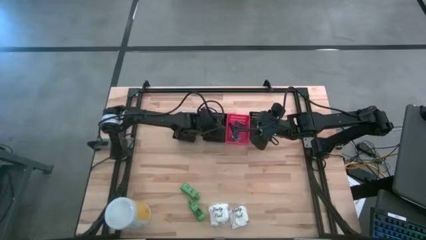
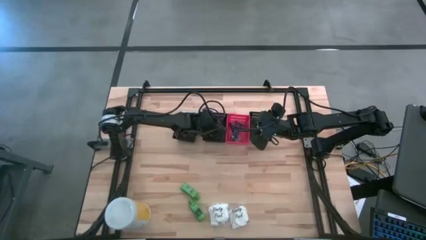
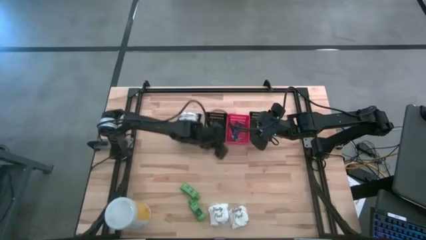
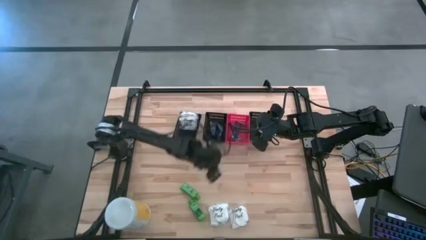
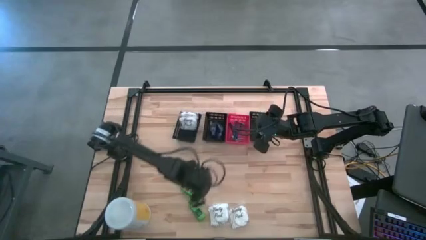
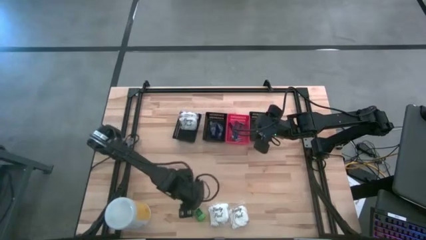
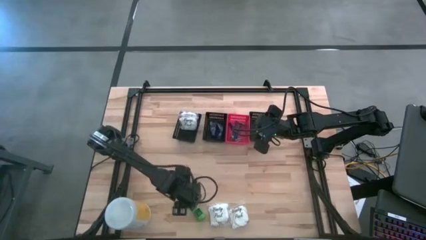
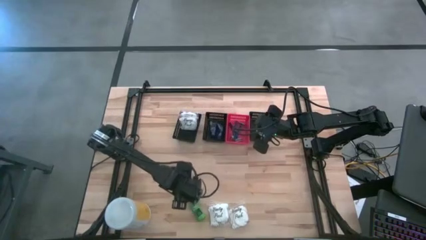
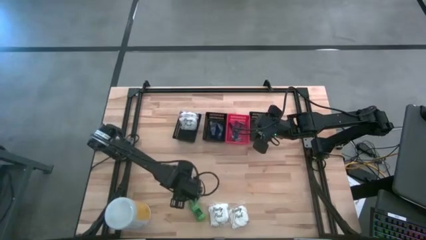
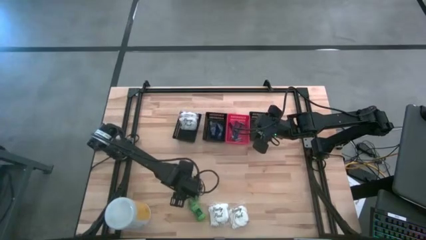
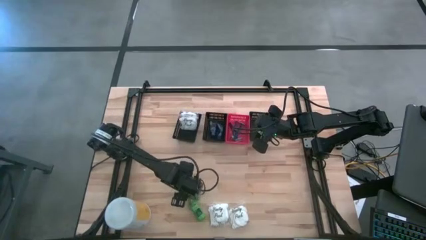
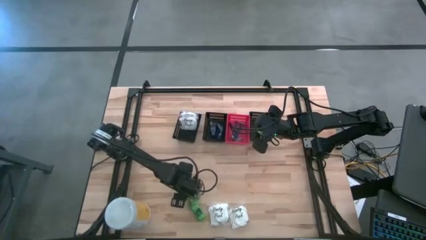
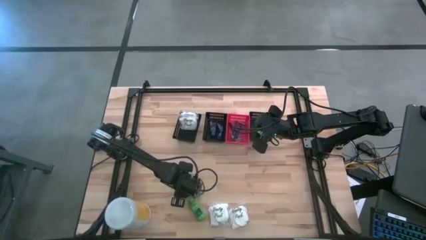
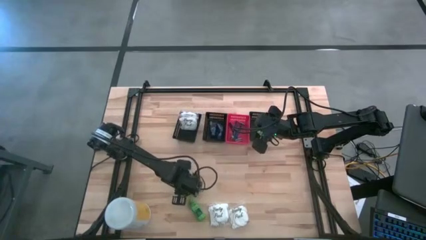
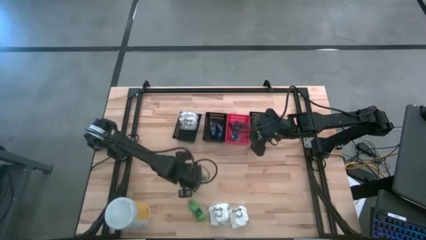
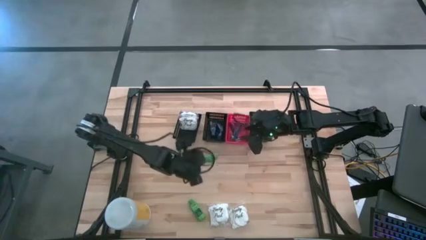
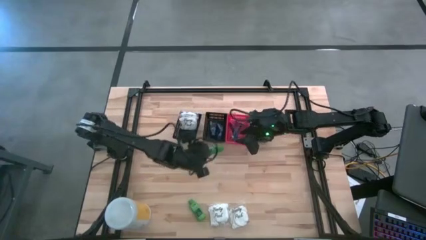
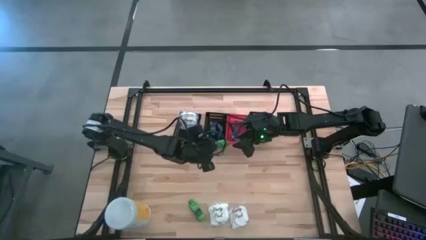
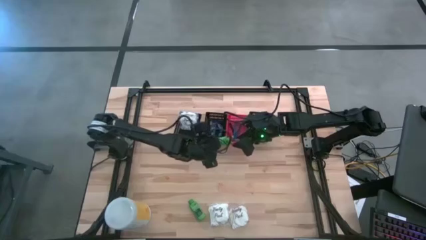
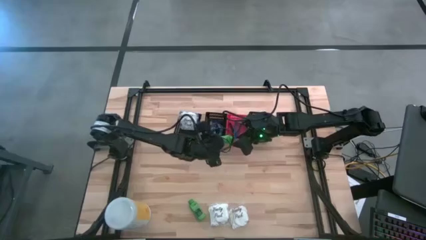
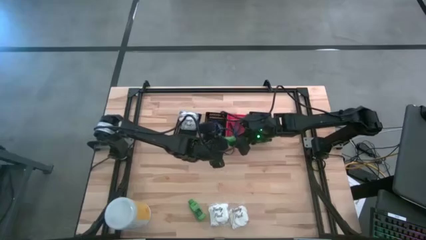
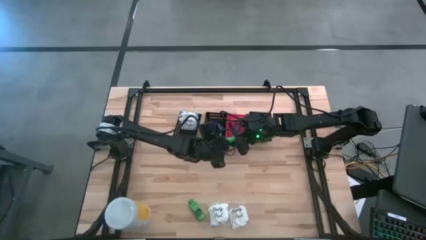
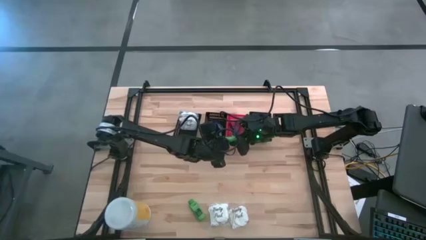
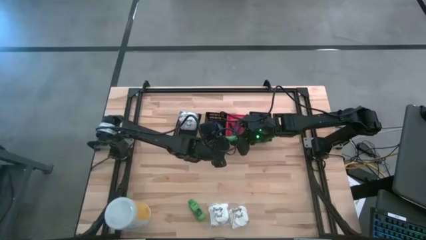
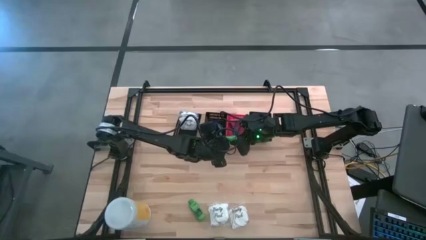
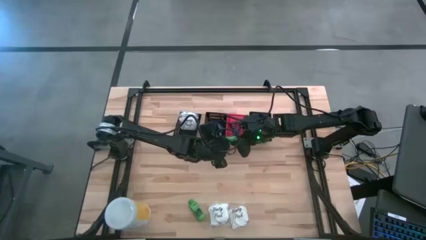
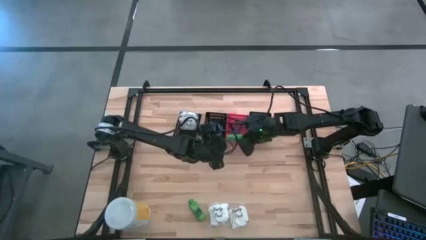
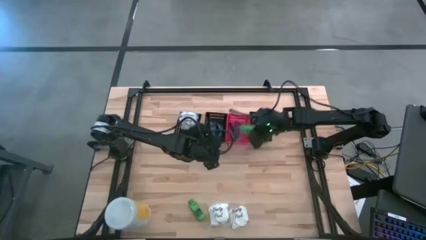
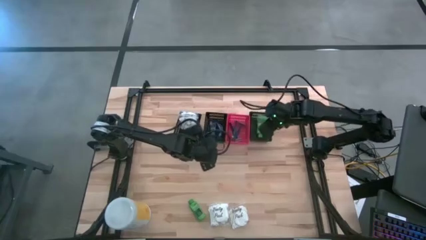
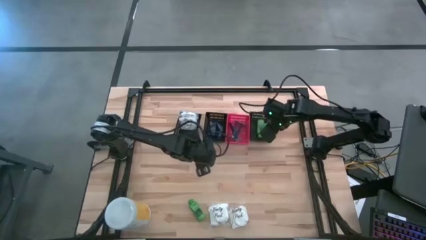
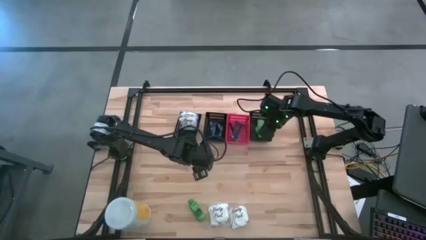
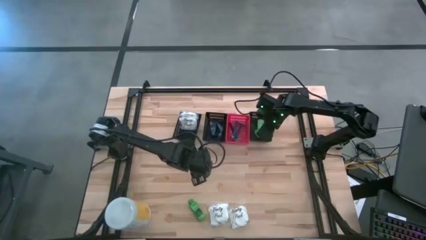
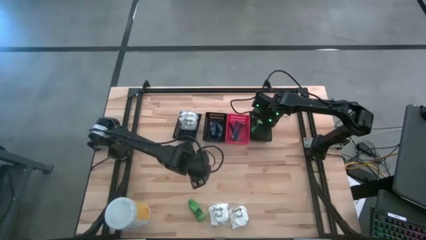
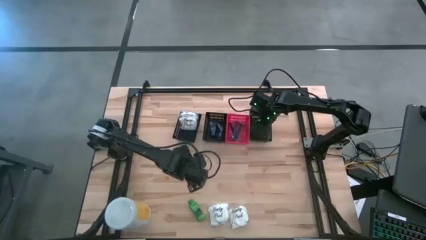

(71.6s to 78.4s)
Task: Pick & Place Travel size toiletries
Put the shampoo into the right black bin

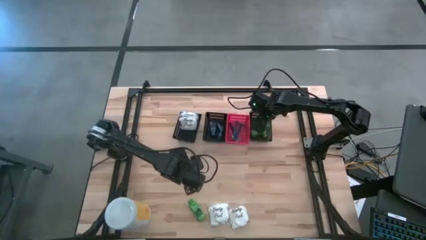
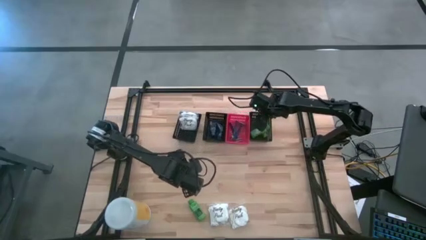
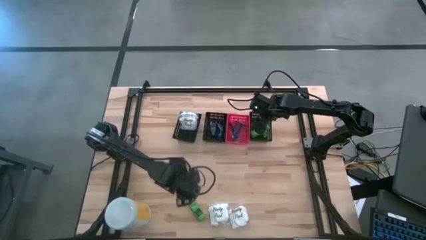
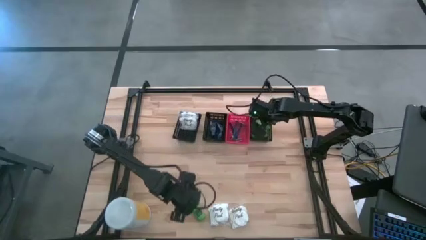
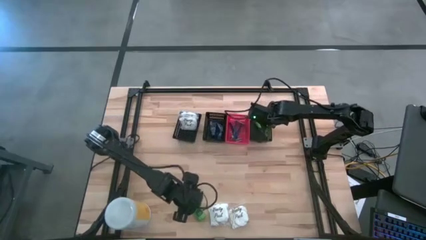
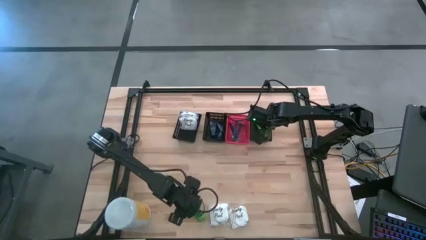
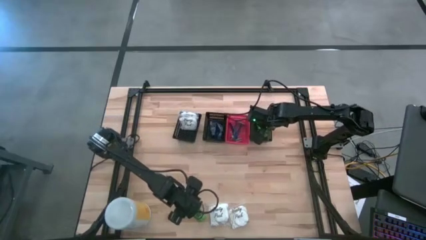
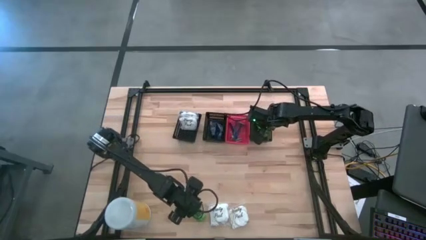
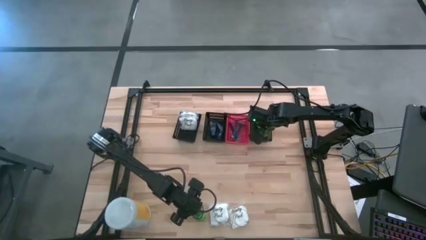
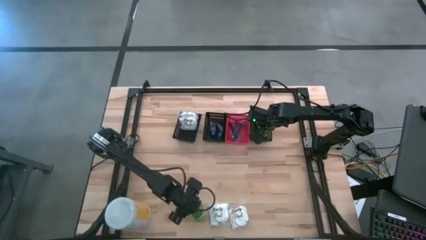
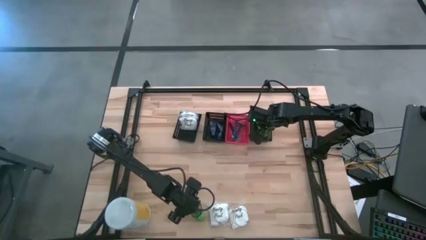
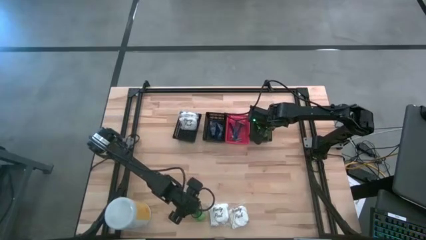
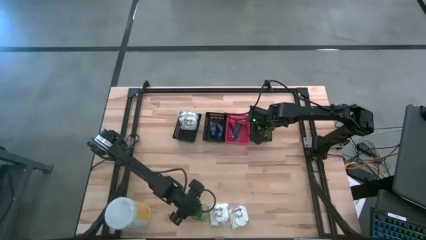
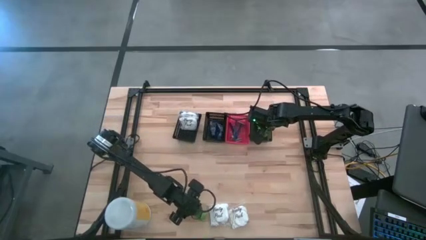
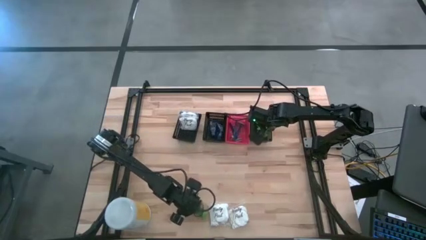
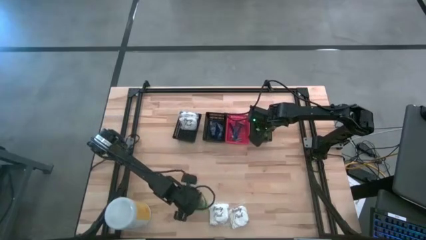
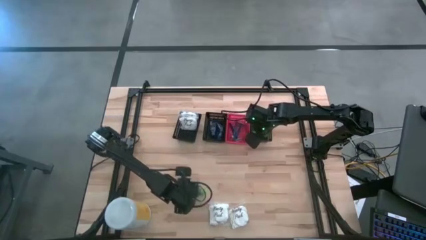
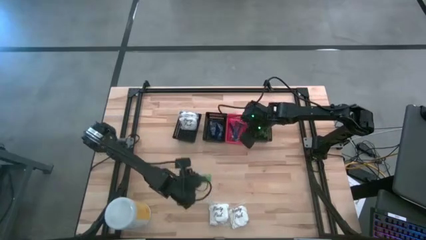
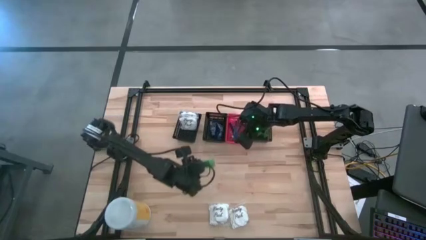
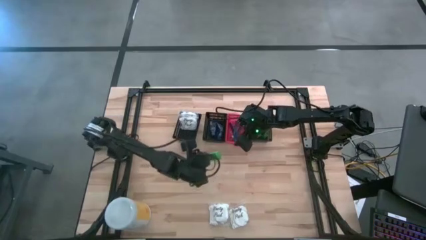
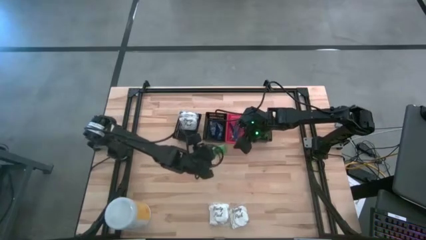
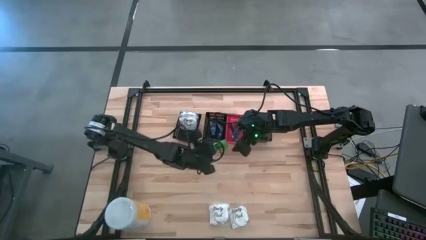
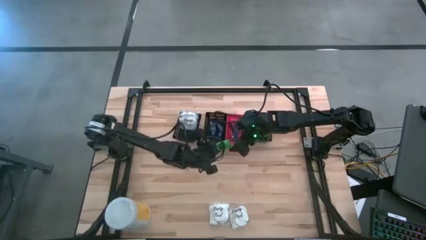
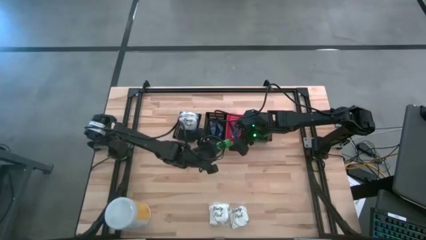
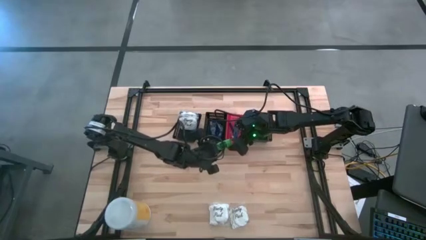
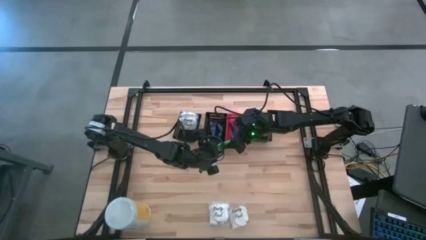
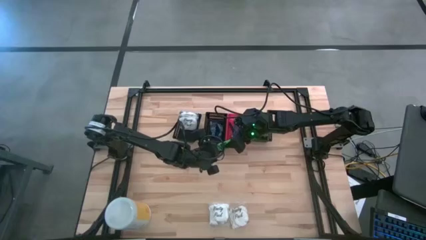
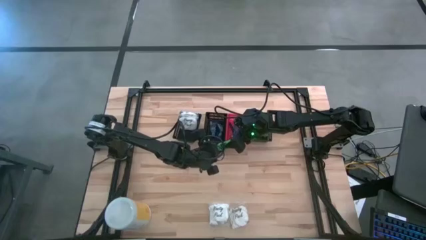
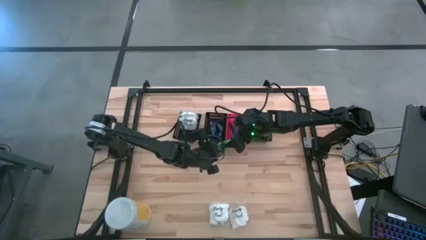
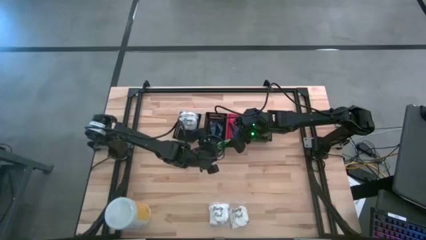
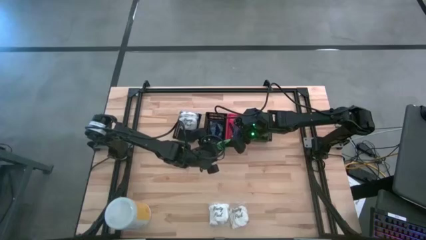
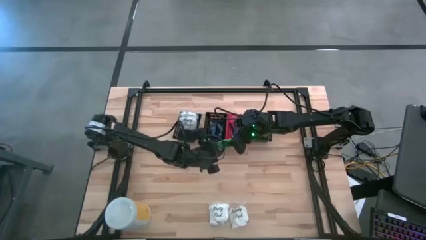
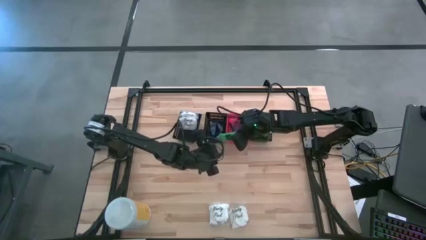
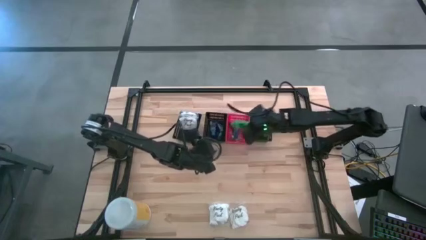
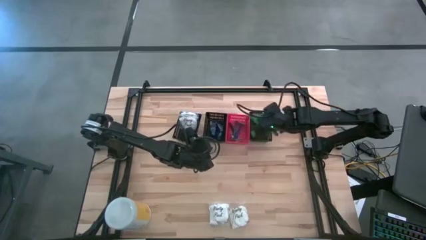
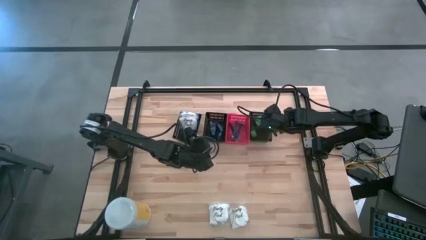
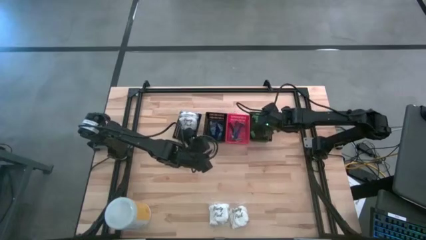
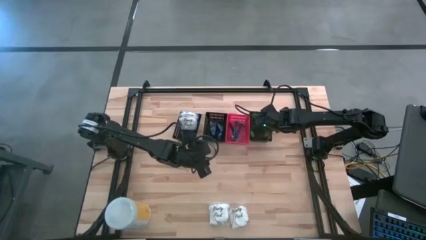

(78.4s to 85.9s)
Put the shampoo into the right black bin

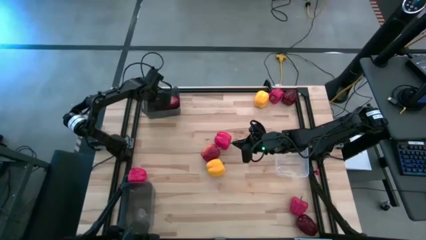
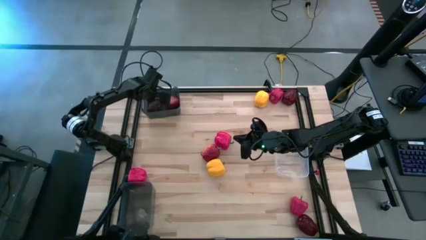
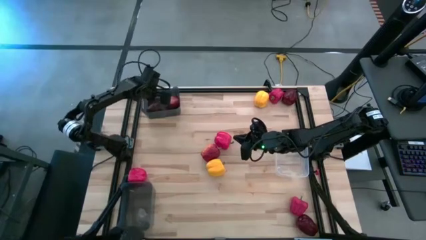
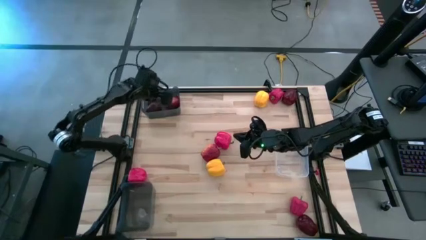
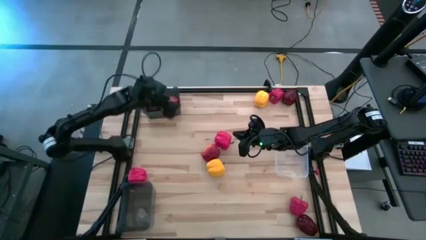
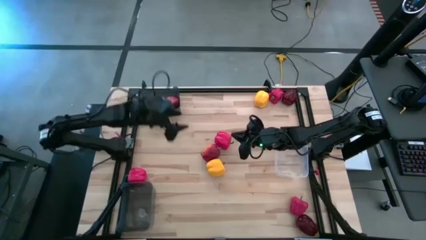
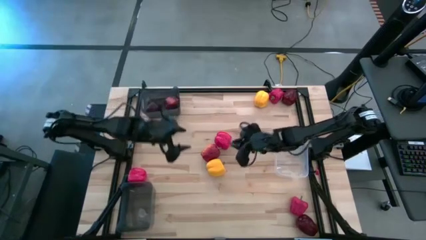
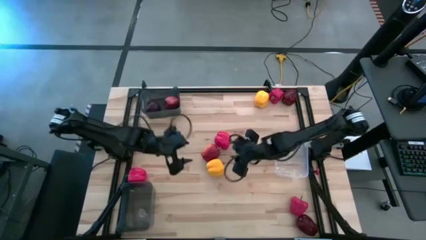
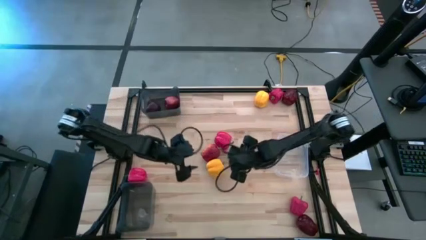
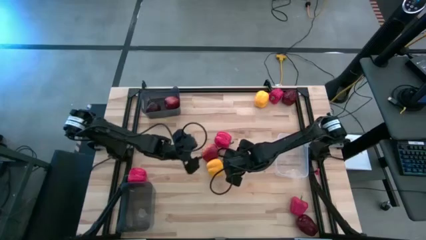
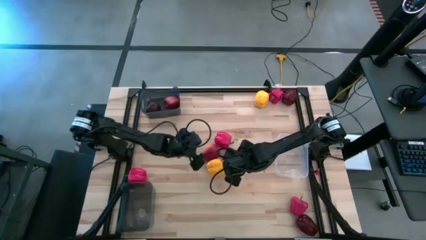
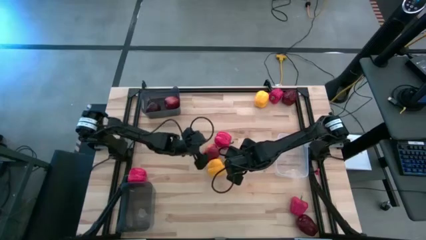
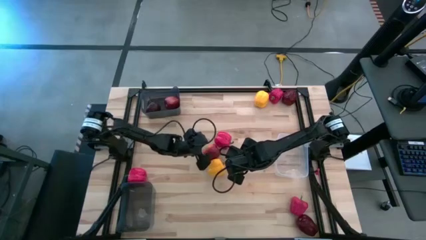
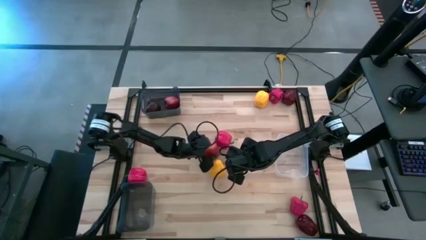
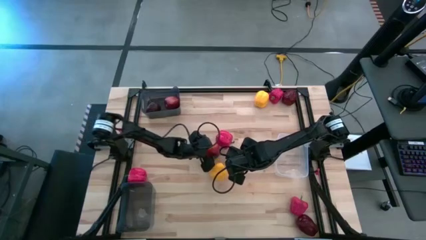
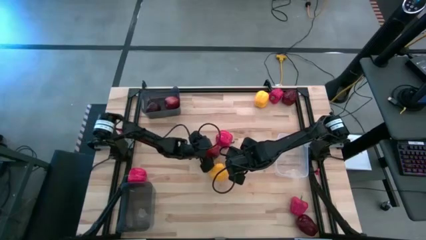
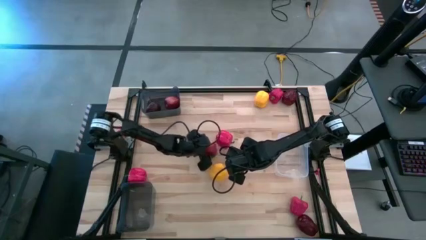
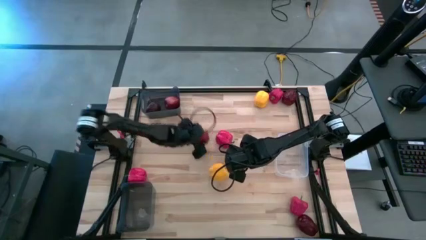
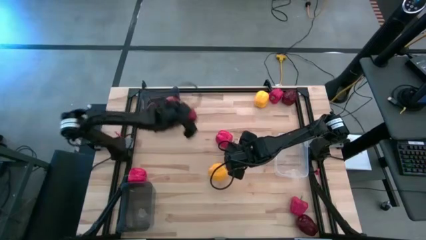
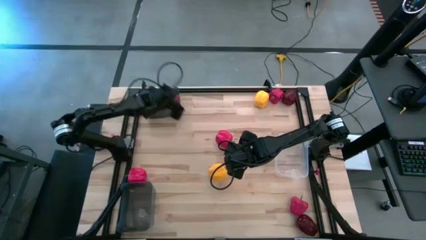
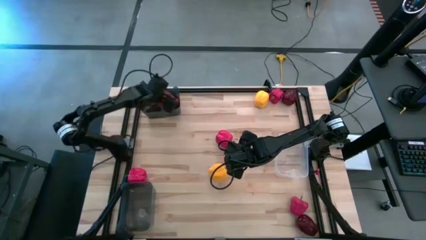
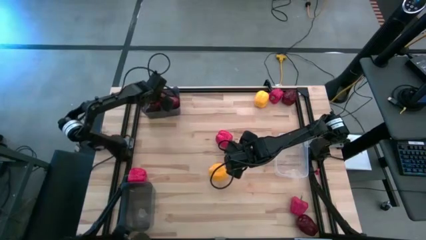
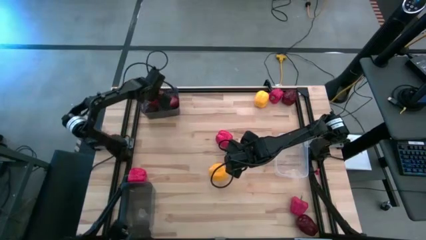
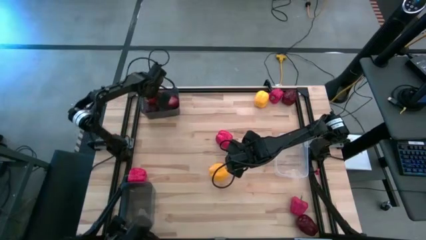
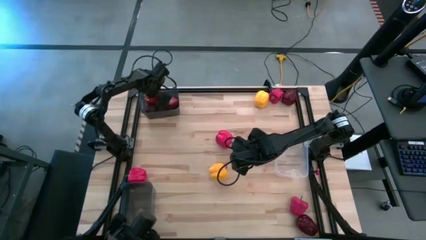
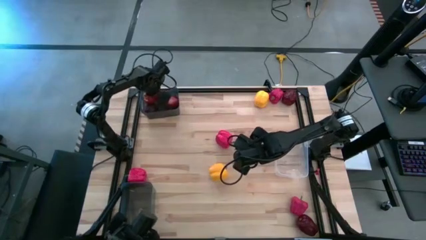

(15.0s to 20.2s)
Task: Sort produce into baskets
Put the apple into the top black bin
